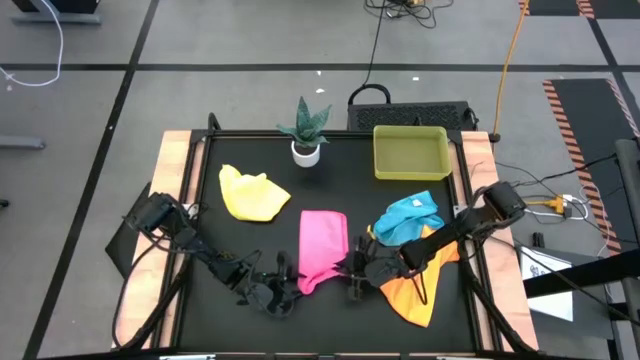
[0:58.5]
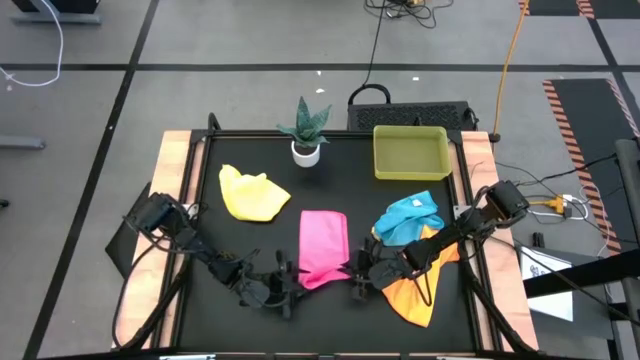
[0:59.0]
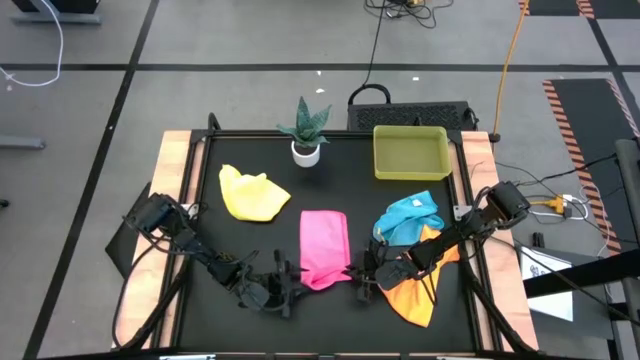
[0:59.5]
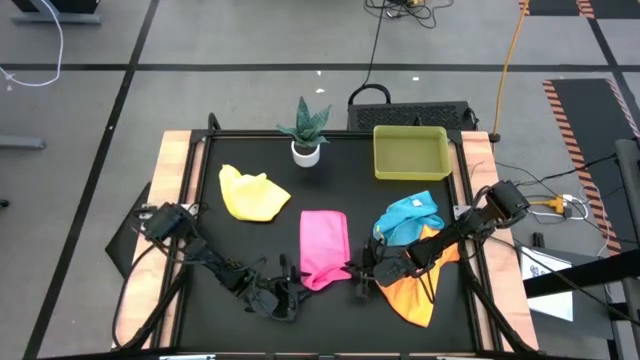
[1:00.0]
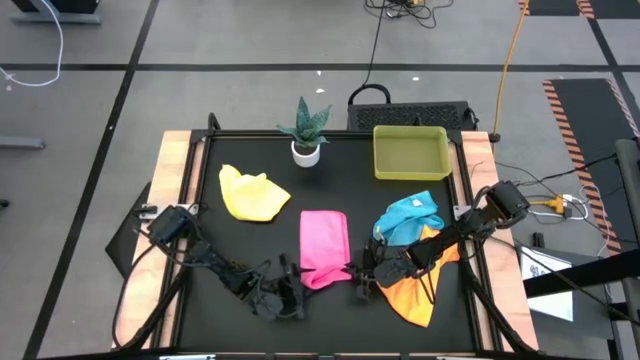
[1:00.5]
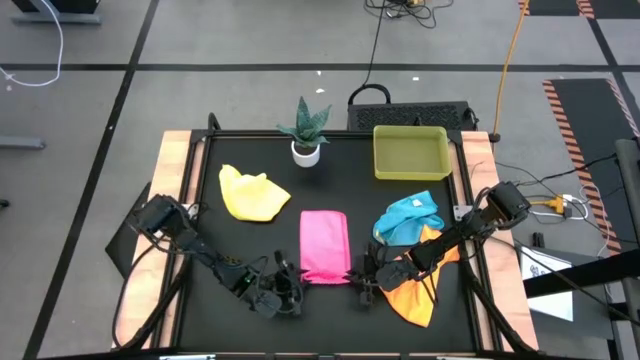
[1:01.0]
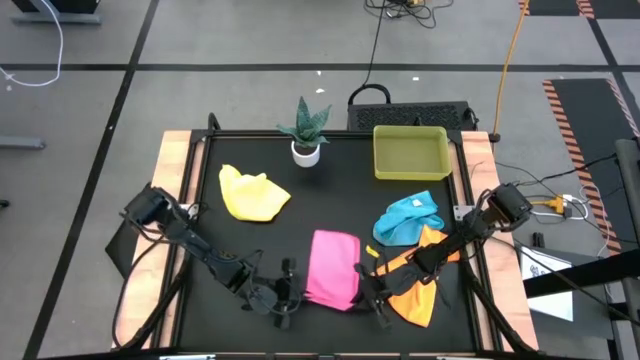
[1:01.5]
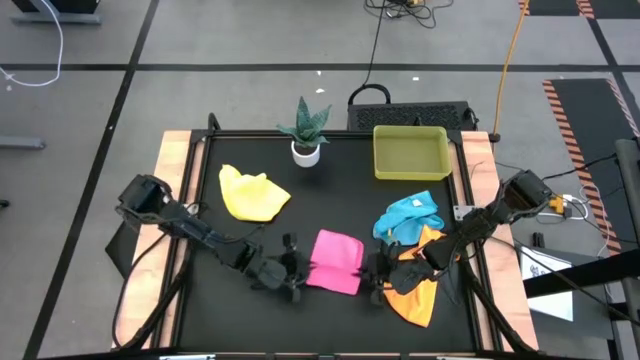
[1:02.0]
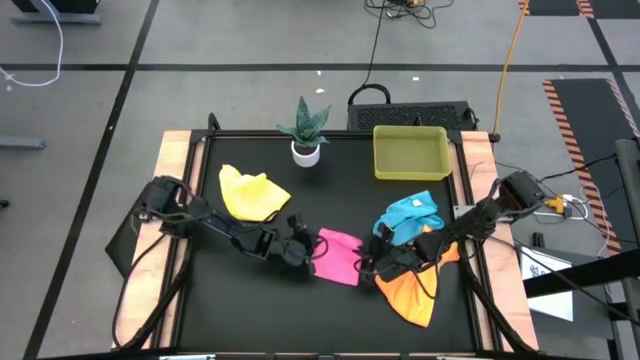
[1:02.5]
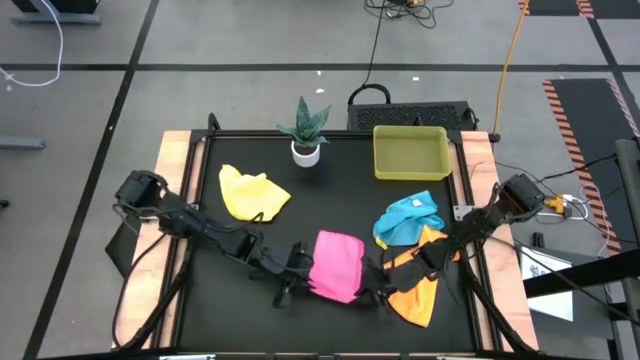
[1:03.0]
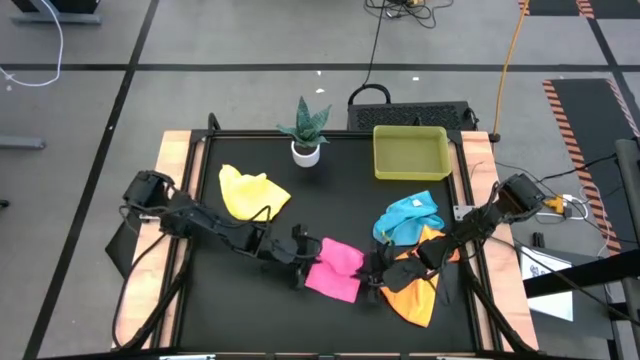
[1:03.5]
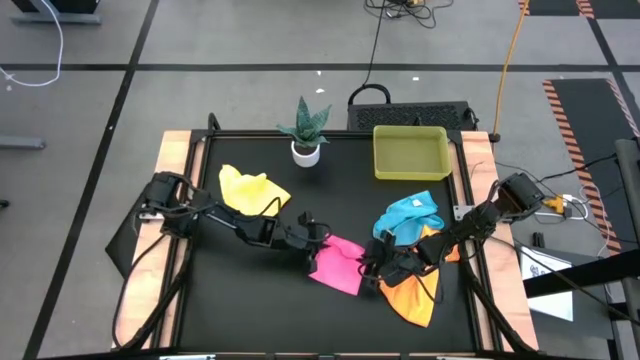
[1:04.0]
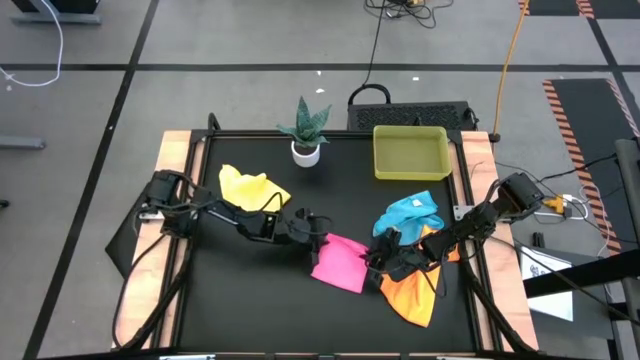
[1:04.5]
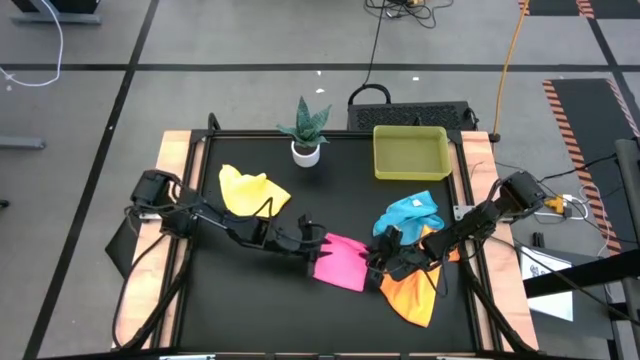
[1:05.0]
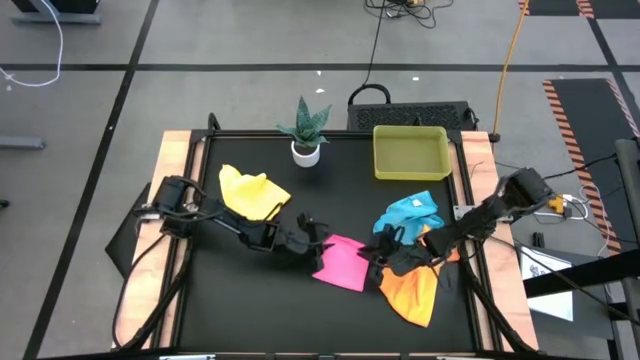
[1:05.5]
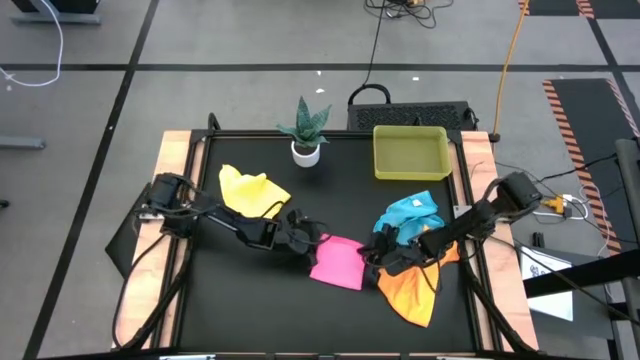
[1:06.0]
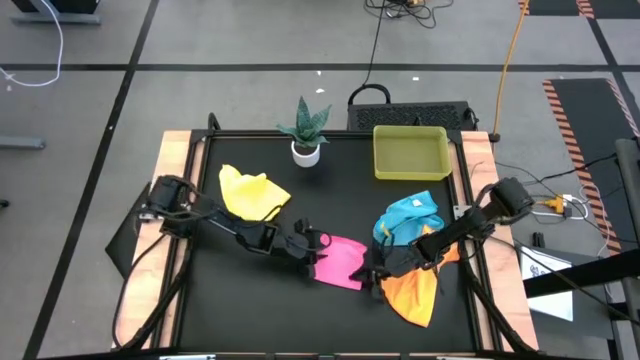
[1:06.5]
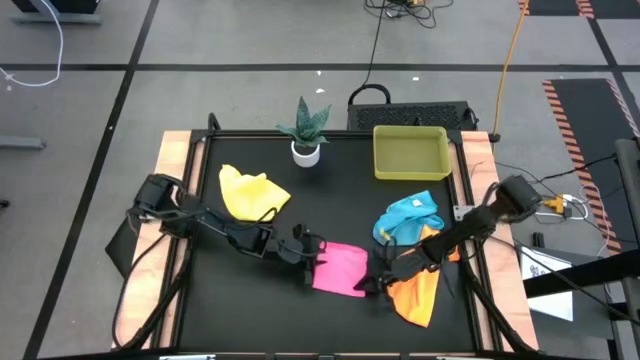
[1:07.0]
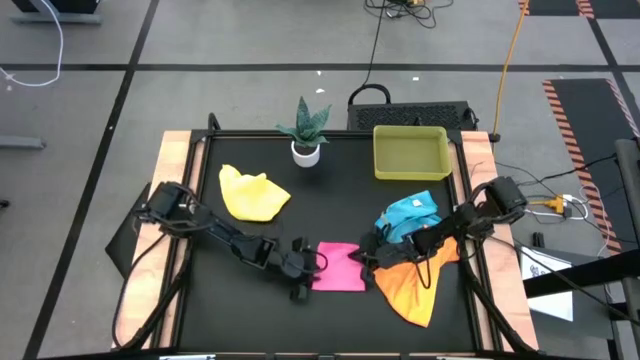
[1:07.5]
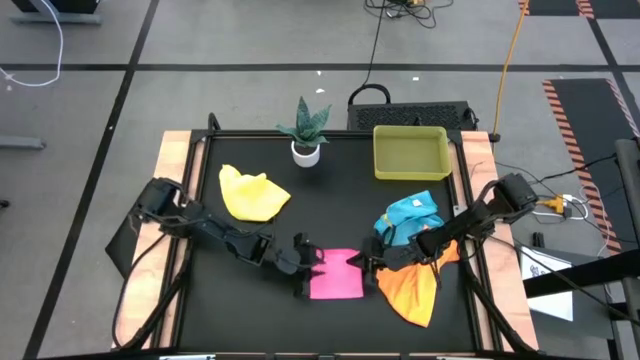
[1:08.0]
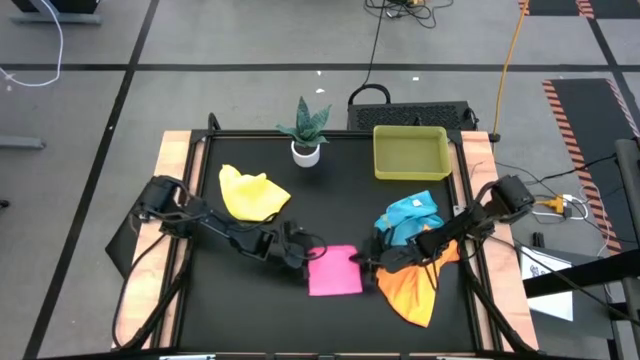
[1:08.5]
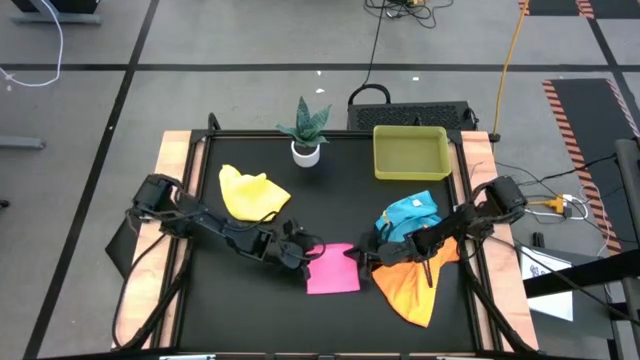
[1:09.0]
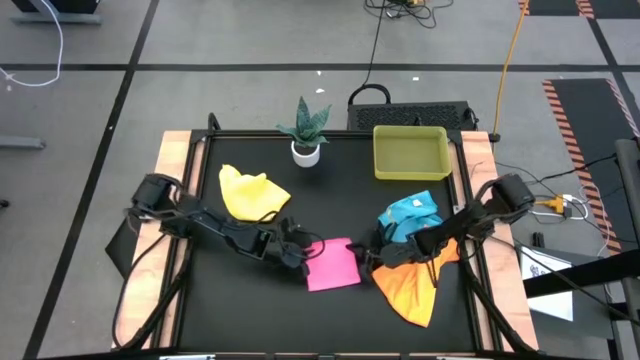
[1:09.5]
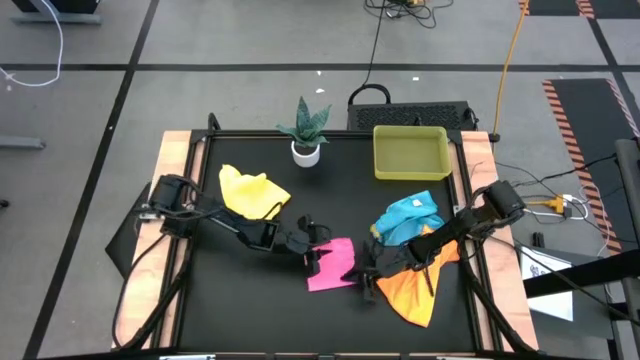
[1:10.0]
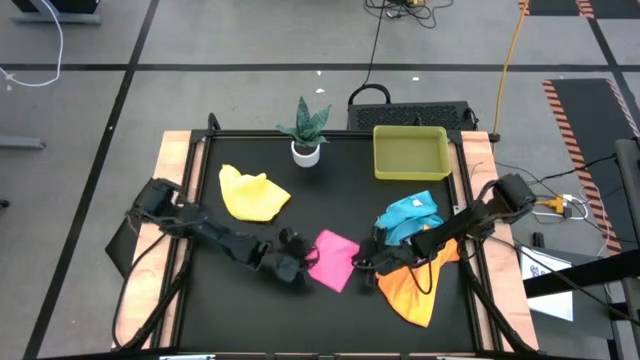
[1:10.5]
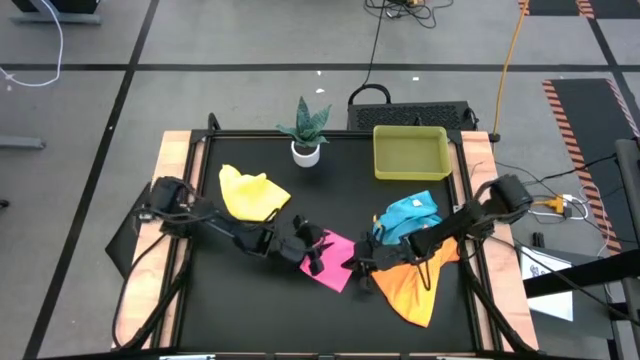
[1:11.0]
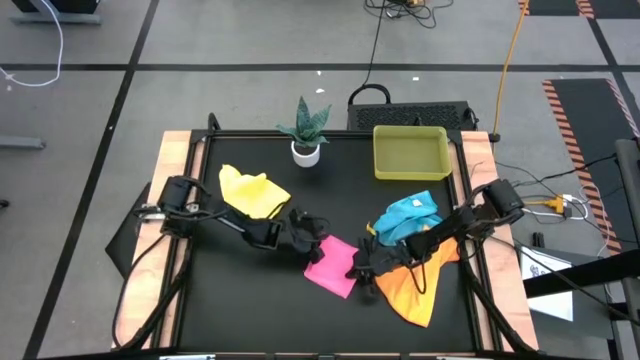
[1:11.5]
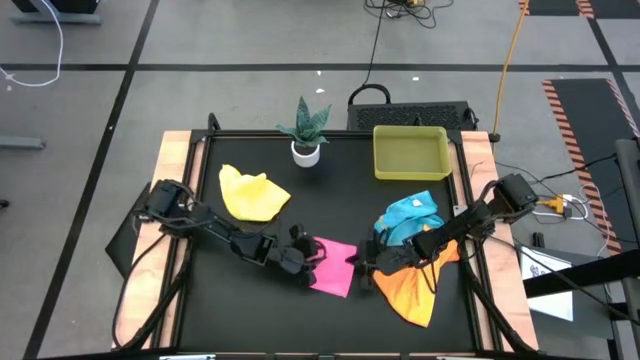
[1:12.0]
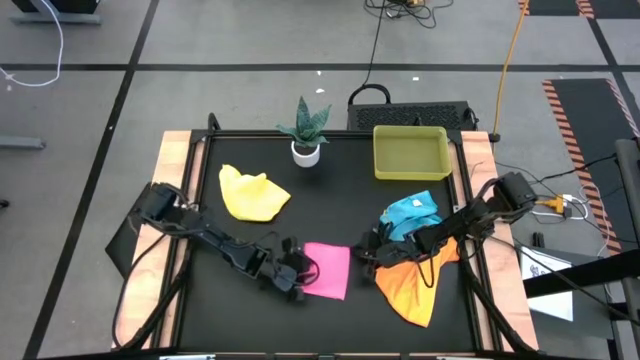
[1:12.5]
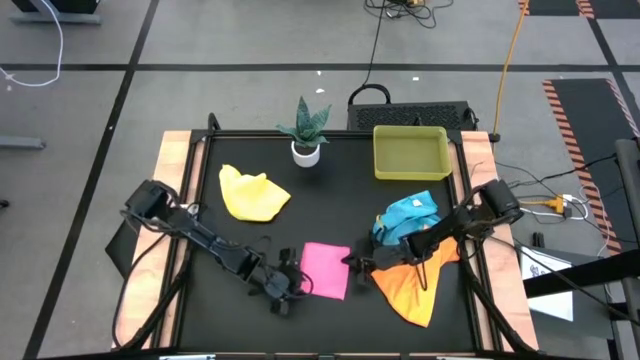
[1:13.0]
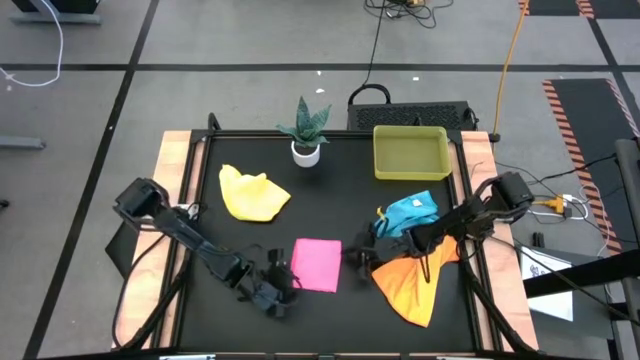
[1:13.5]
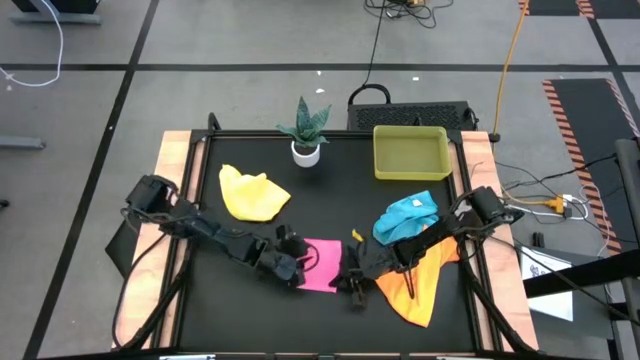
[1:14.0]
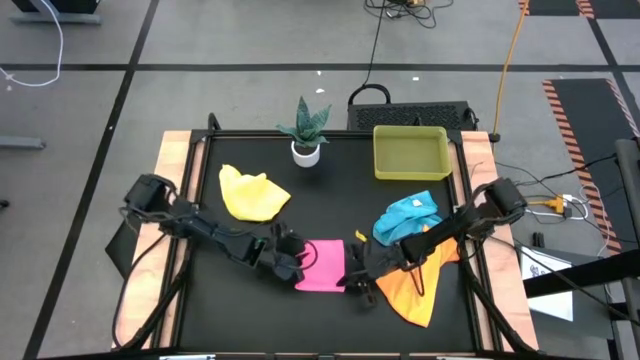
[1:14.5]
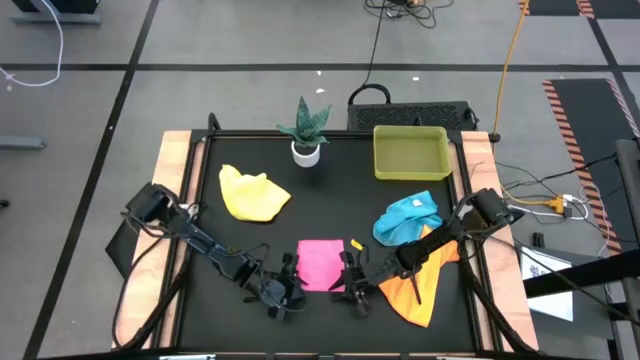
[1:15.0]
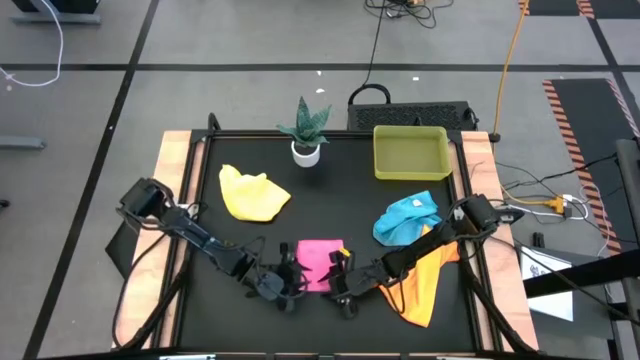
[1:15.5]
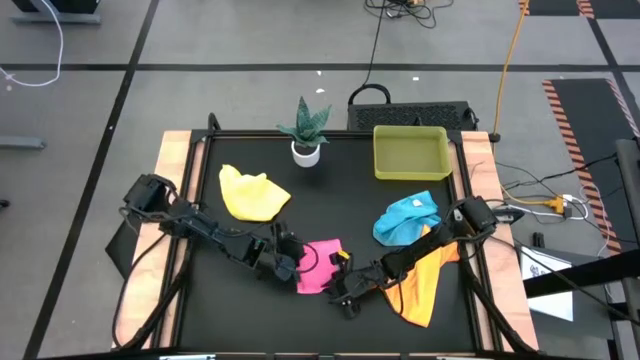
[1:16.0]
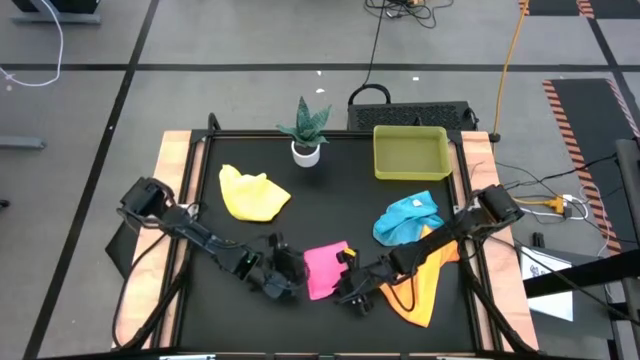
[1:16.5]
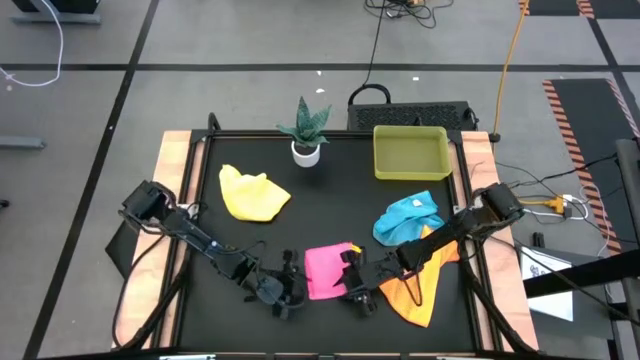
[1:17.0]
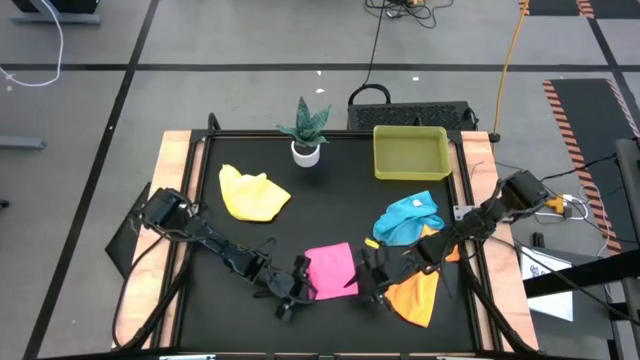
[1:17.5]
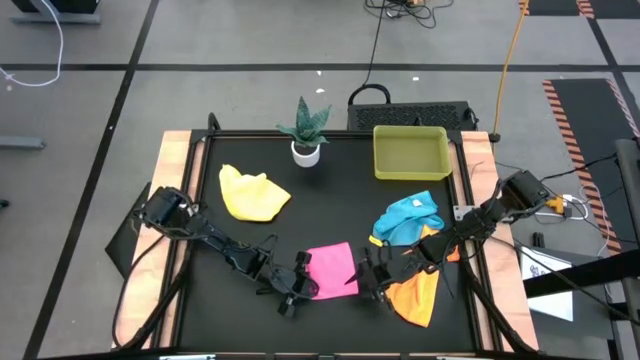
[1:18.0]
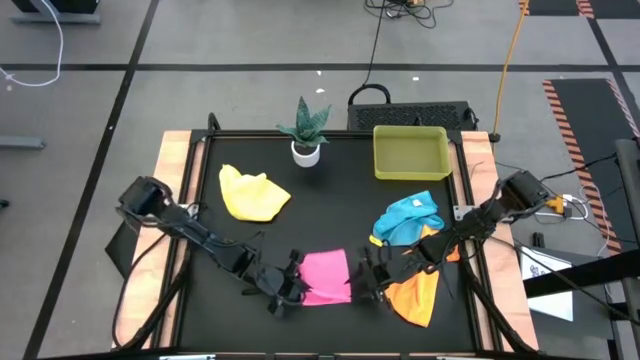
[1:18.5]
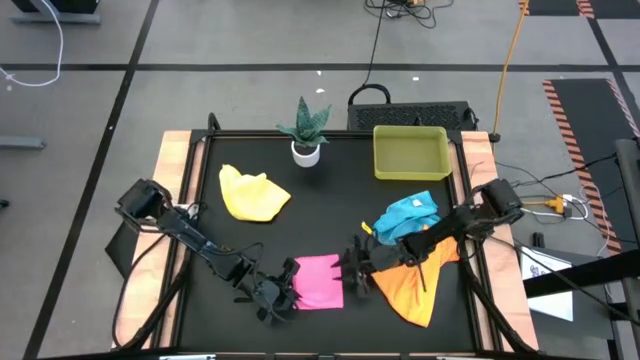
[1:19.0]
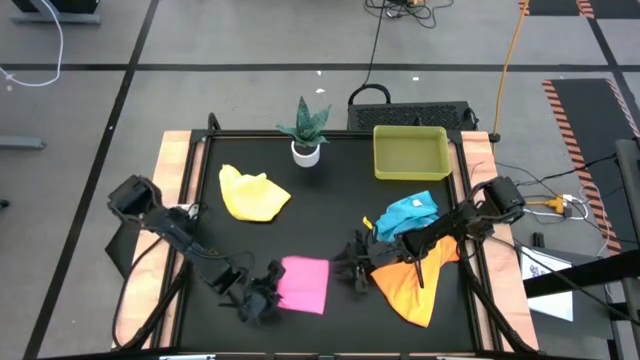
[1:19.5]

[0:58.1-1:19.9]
Task: Fold microfiber towels
Fold the pink microfiber cloth
